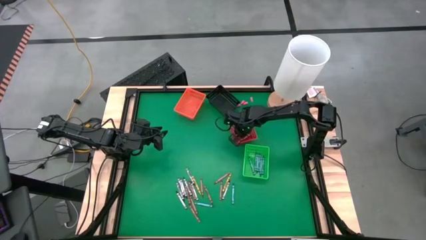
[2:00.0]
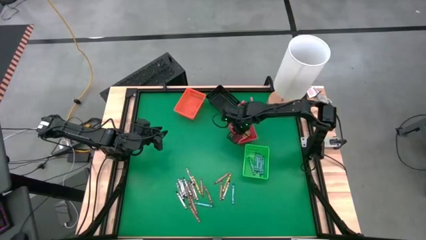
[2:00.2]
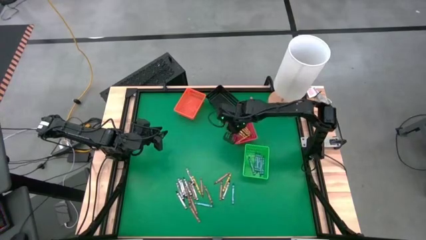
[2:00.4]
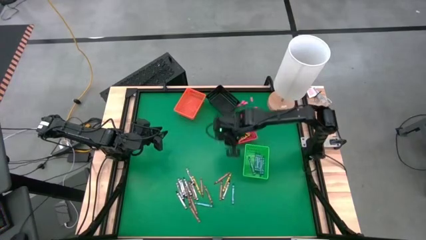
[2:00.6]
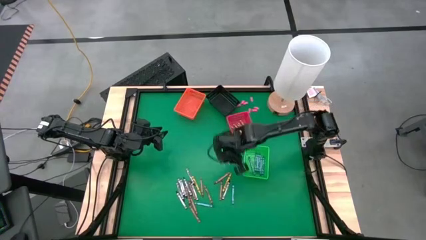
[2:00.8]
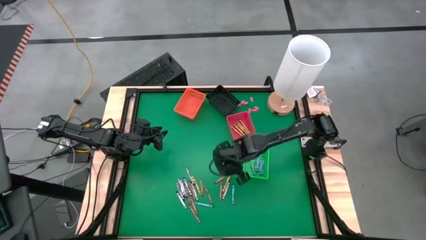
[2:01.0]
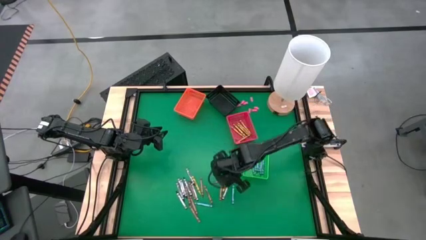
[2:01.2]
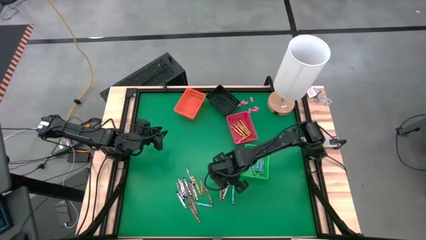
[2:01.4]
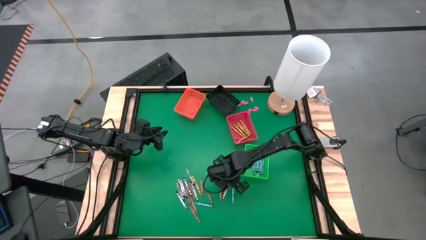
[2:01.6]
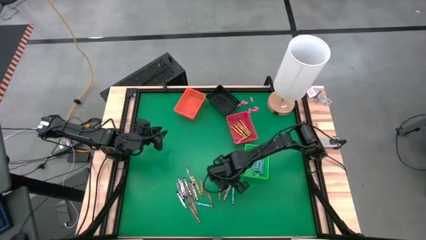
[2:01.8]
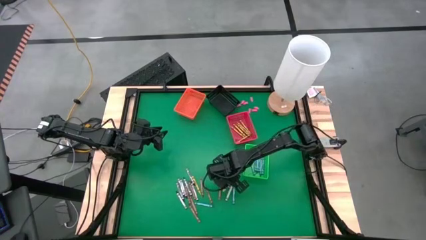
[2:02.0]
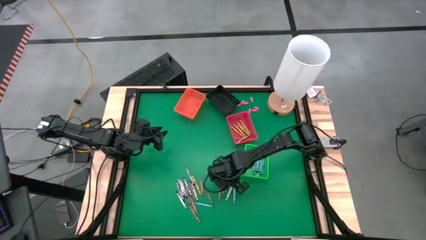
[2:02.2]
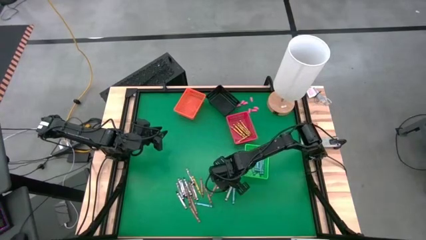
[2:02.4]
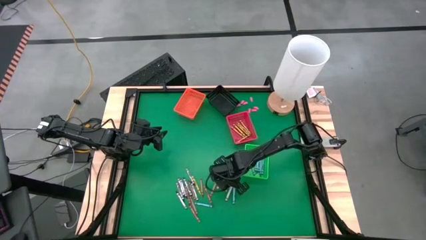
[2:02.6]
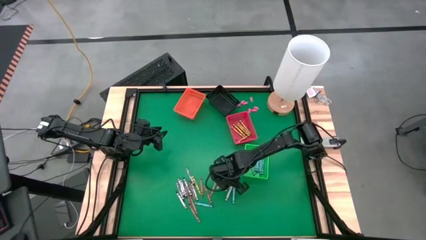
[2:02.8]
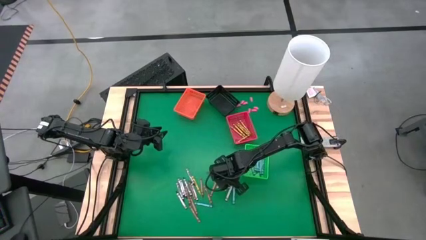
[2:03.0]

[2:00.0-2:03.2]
Task: Sort crayons
Put the green-yellow crayon into the red bin

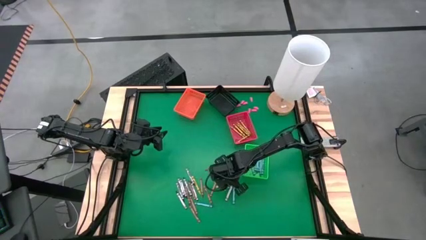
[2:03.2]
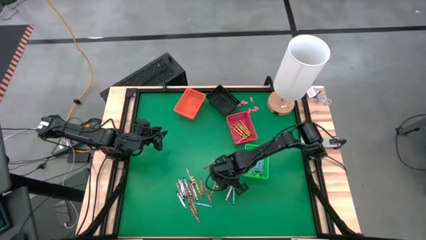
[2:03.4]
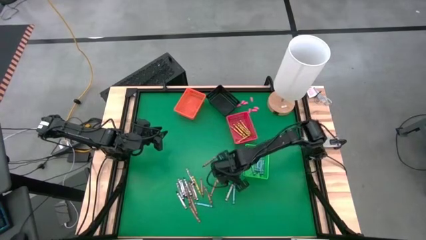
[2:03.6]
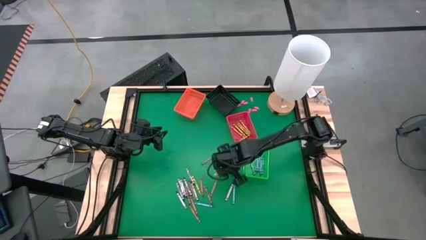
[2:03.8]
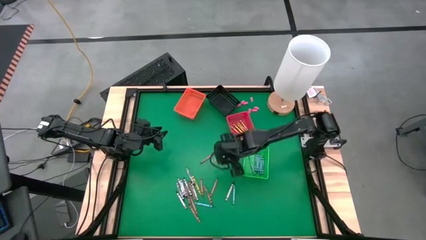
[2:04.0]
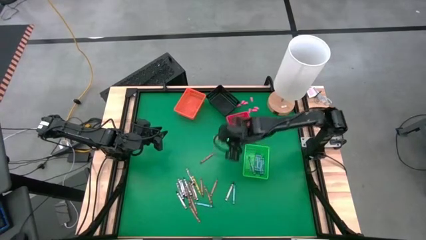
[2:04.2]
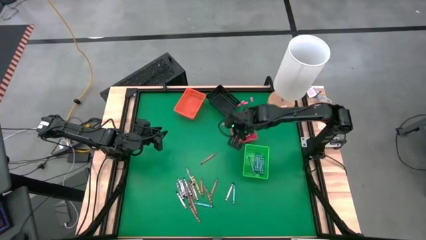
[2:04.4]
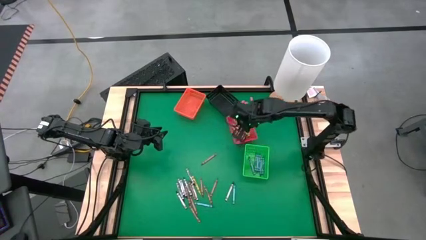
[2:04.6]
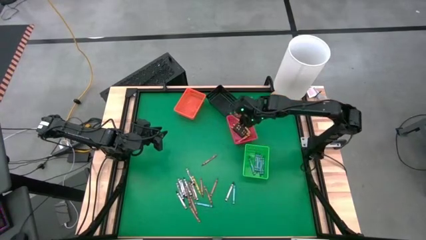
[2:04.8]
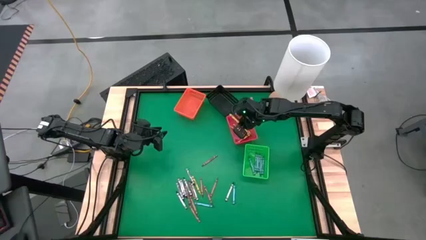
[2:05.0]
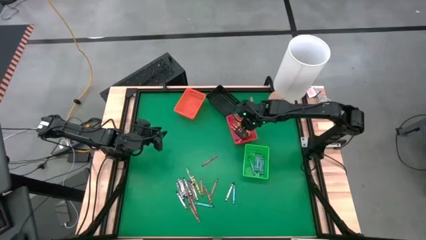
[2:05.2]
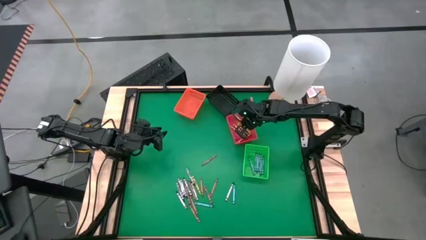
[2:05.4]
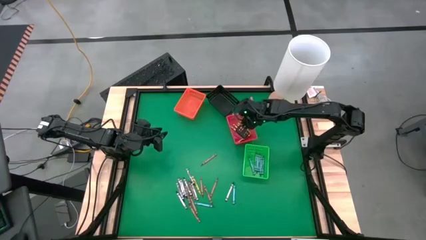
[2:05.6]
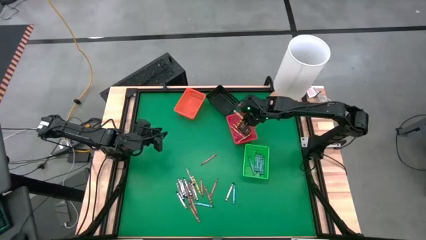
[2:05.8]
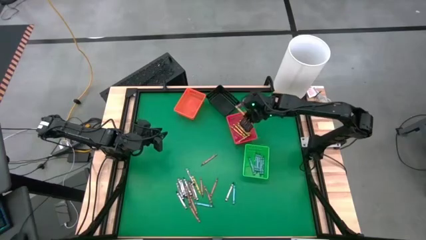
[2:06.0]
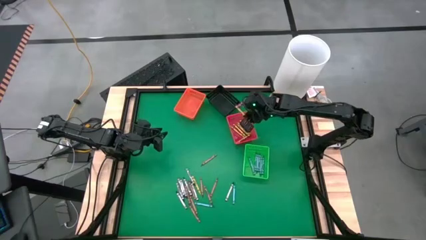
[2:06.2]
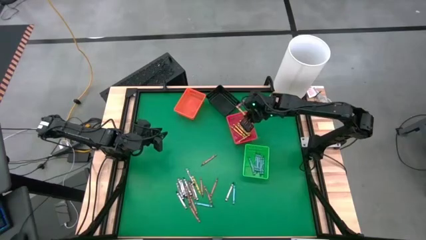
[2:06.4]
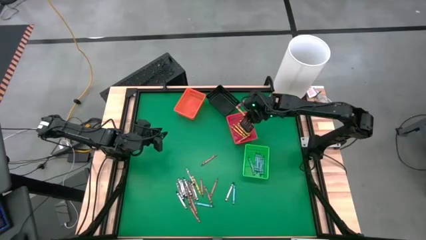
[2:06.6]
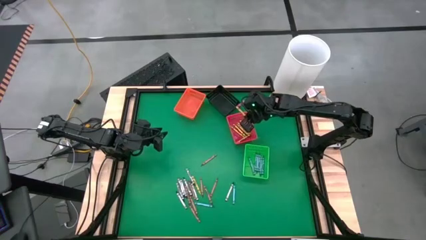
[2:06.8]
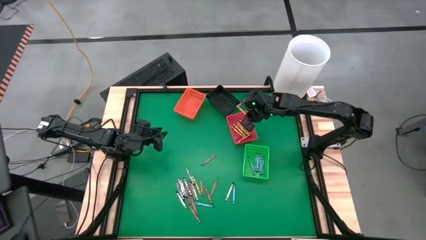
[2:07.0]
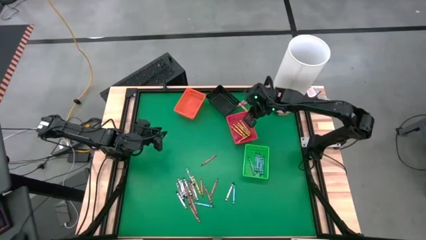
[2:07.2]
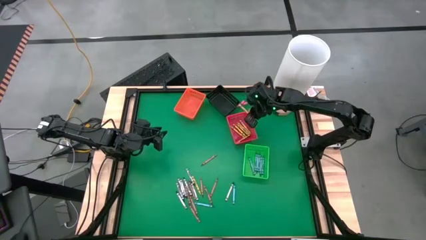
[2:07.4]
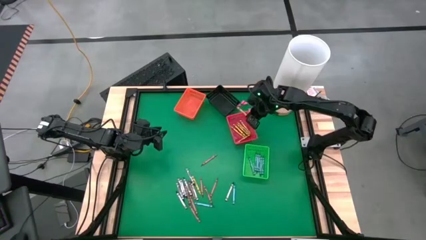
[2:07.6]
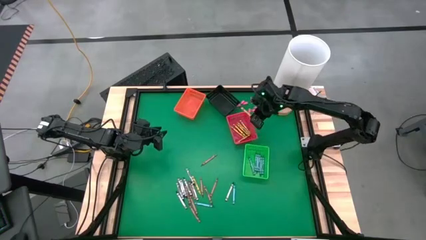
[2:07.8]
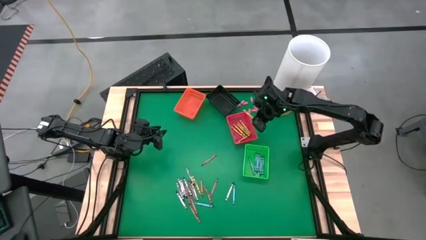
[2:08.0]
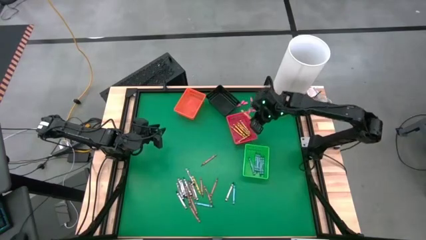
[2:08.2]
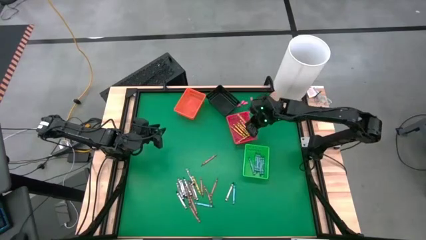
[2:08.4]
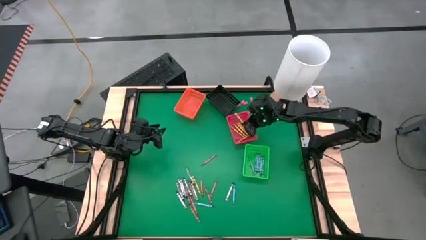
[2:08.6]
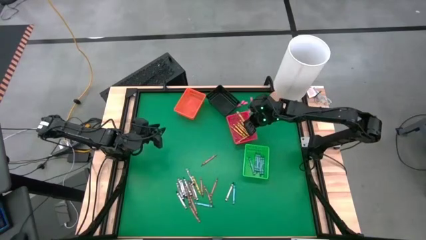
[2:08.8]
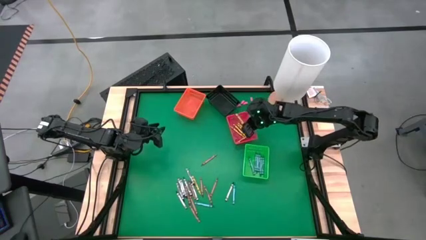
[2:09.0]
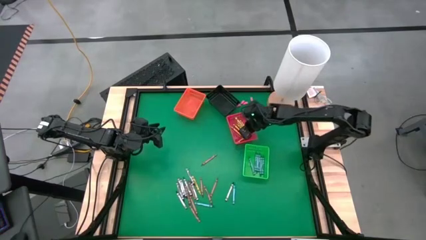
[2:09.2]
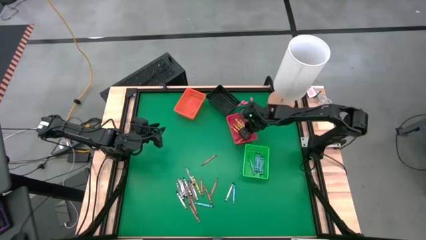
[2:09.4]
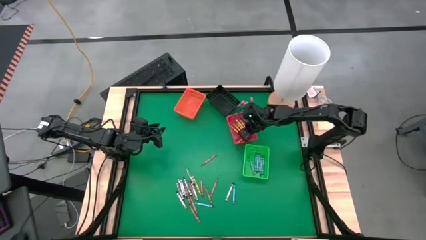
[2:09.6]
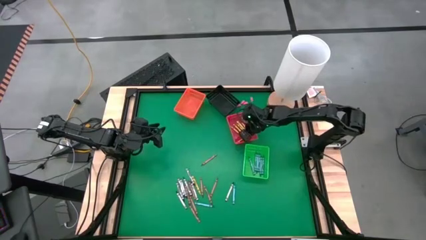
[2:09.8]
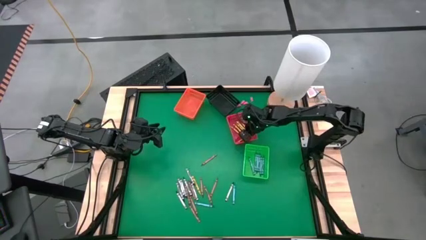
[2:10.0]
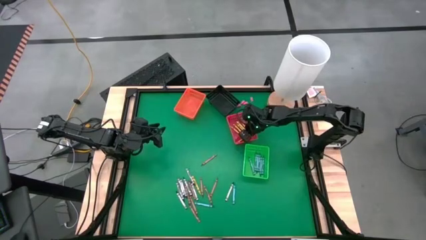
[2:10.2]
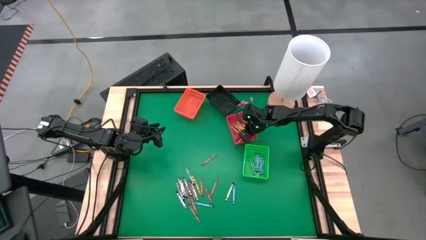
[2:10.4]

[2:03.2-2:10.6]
Put the green-yellow crayon into the red bin
